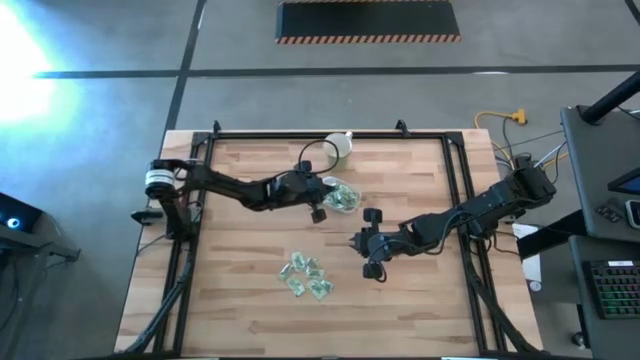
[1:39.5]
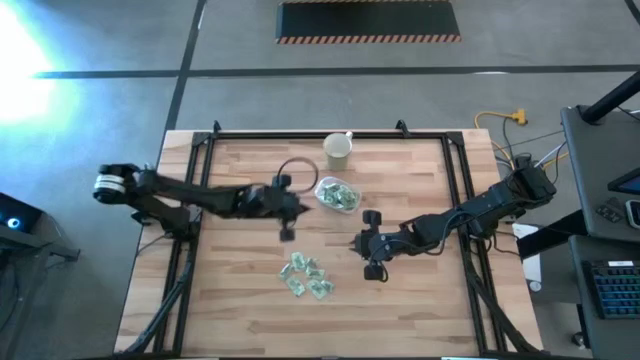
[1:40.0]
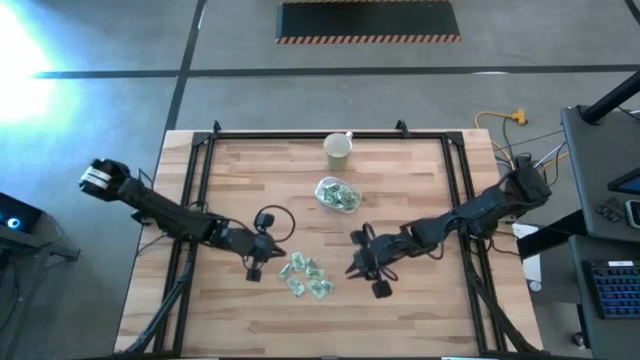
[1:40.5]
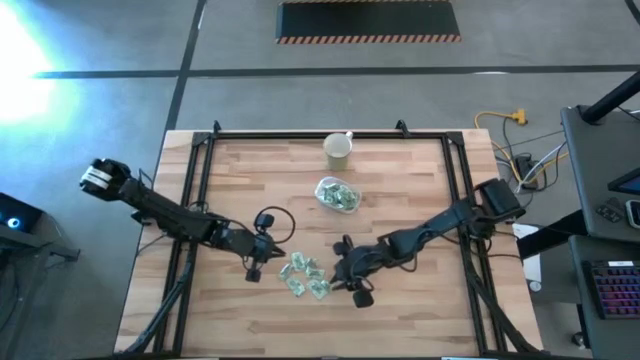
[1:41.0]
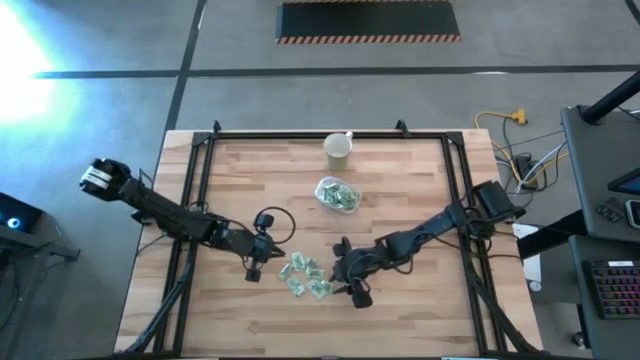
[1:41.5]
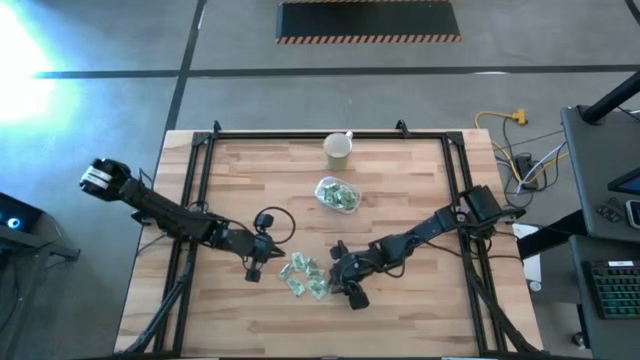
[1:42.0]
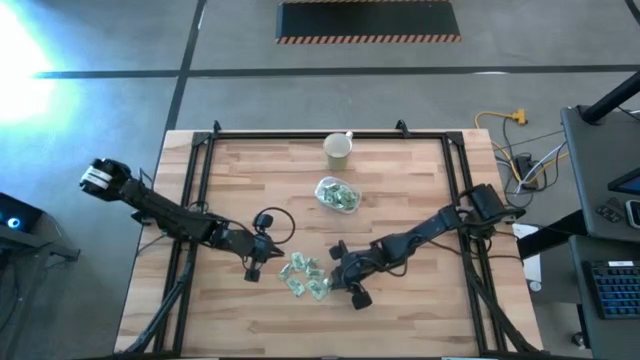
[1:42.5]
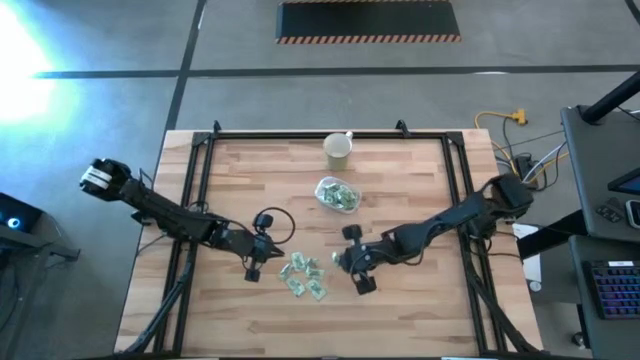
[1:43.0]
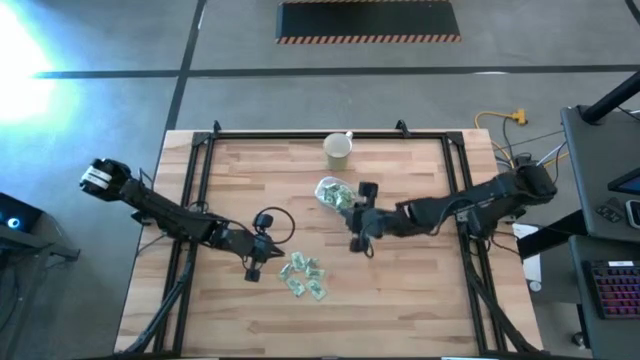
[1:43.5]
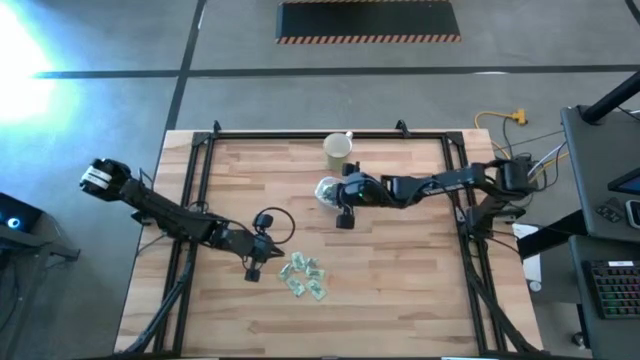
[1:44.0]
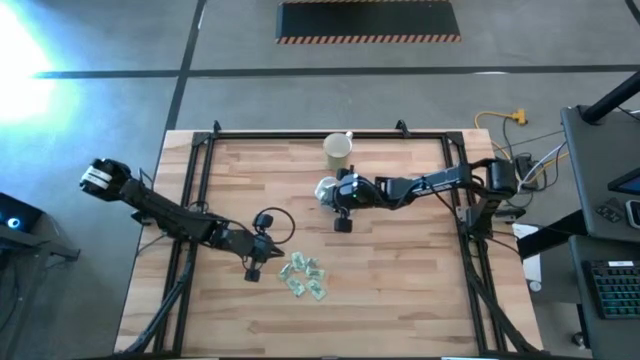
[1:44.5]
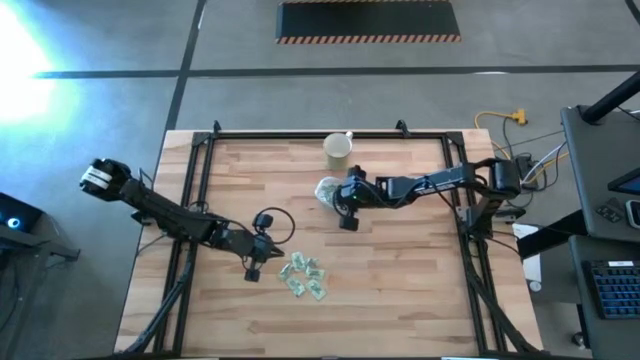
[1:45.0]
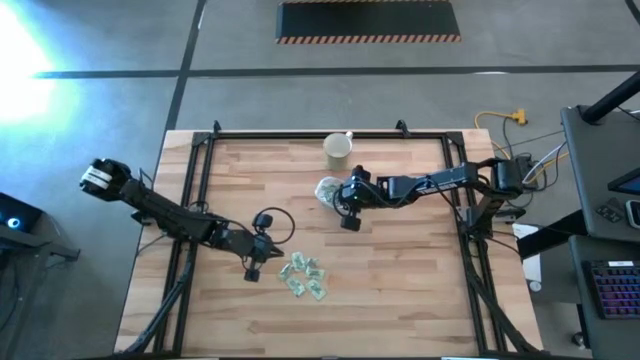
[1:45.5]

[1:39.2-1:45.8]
Task: Pick and place items into bin
Put the green stevia packet into the transparent bin

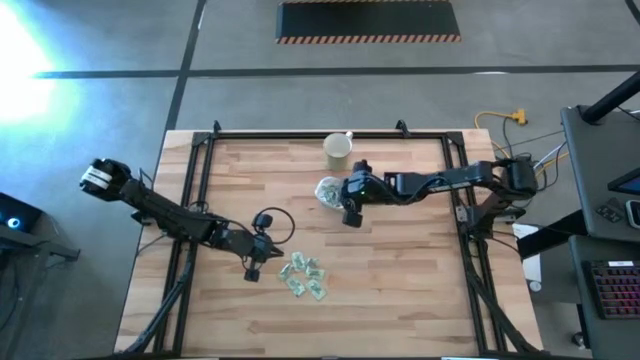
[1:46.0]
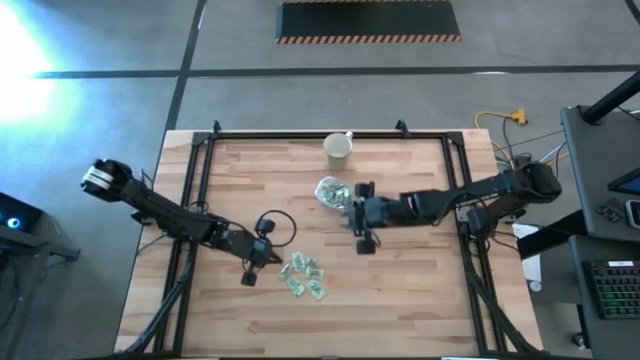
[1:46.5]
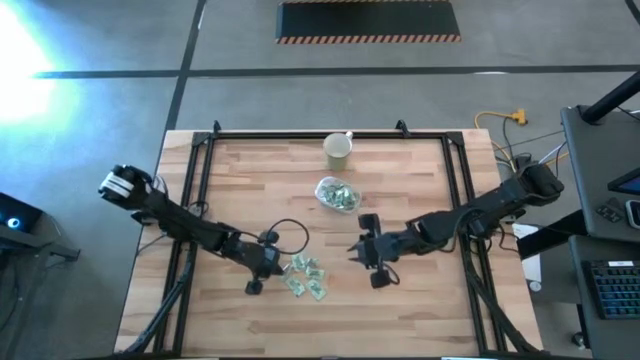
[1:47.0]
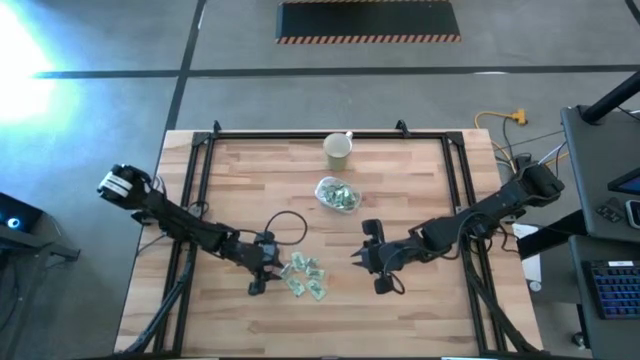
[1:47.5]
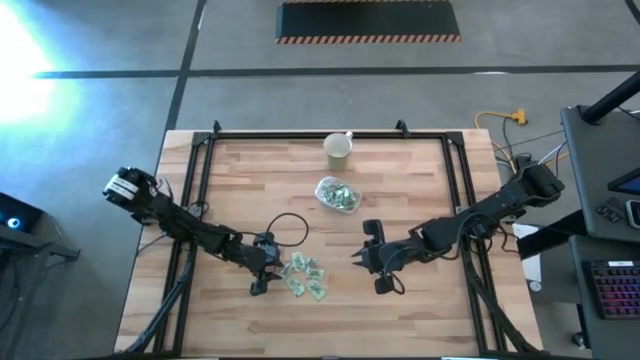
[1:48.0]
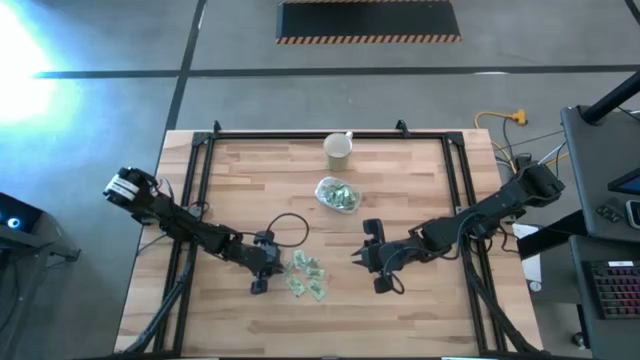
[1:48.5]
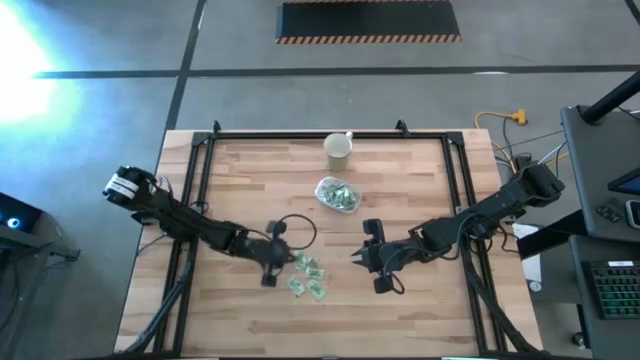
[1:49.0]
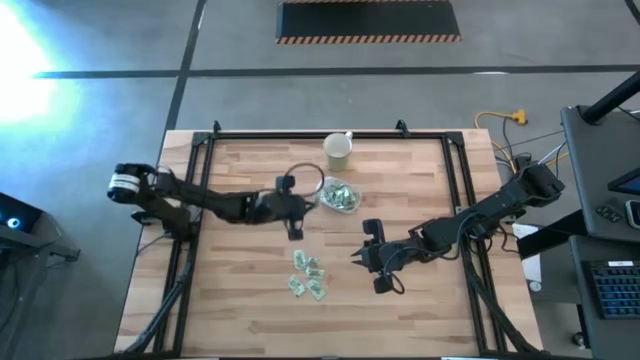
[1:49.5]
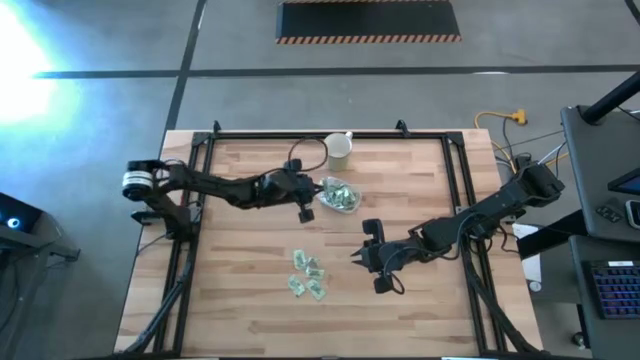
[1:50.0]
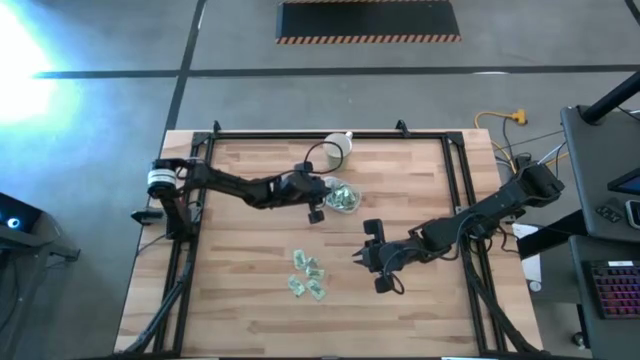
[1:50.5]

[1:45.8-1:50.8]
Put the green stevia packet into the transparent bin

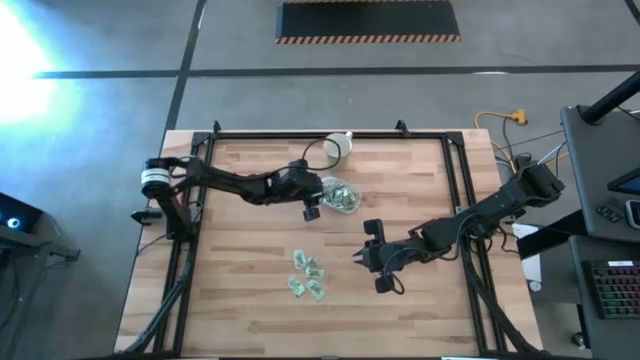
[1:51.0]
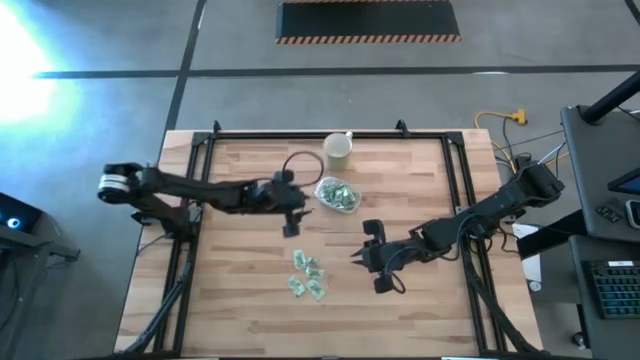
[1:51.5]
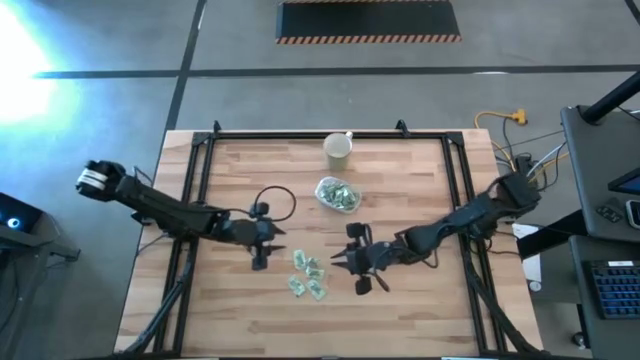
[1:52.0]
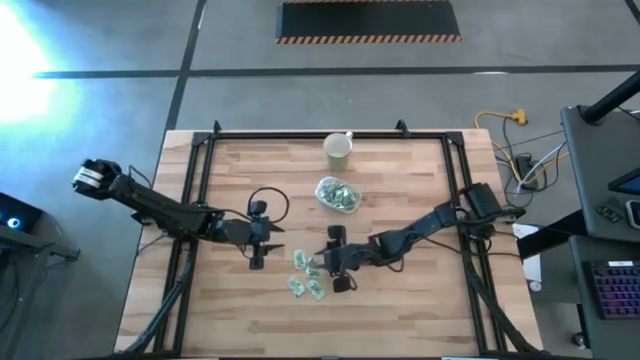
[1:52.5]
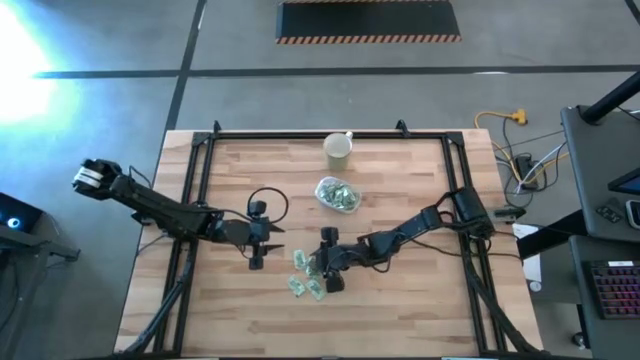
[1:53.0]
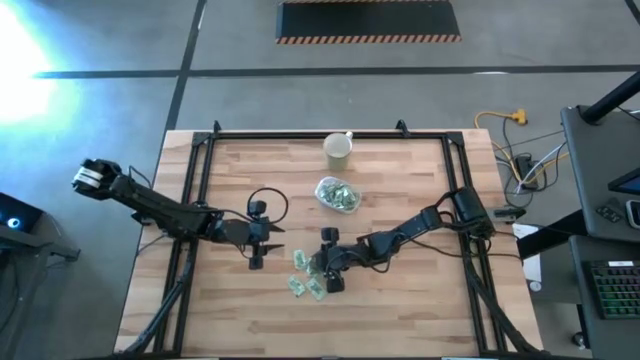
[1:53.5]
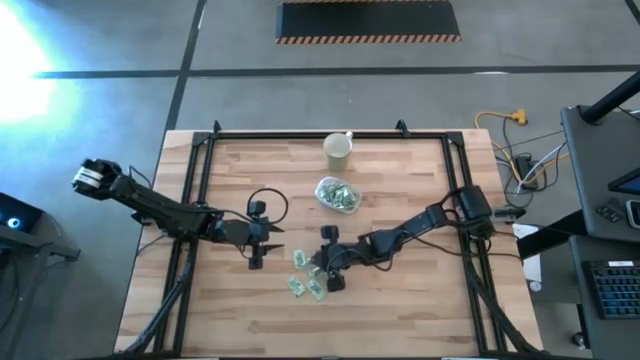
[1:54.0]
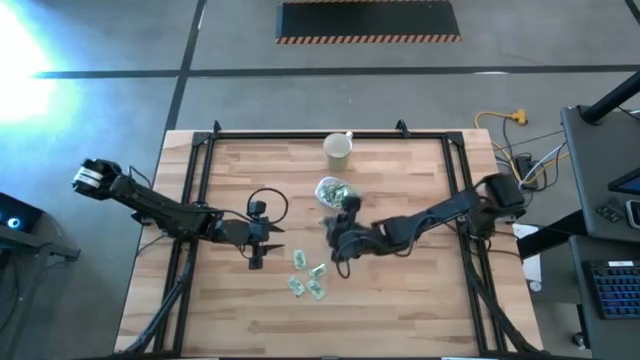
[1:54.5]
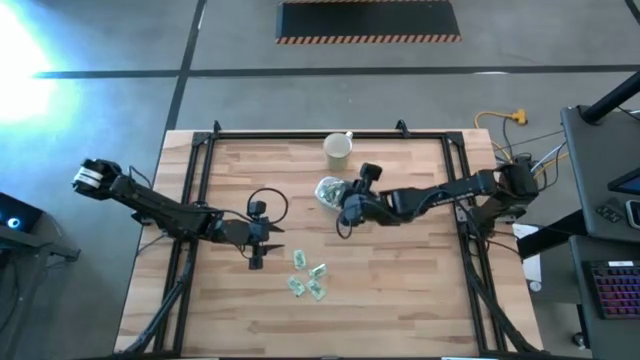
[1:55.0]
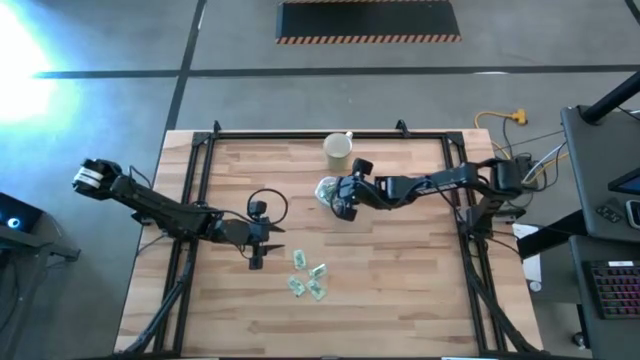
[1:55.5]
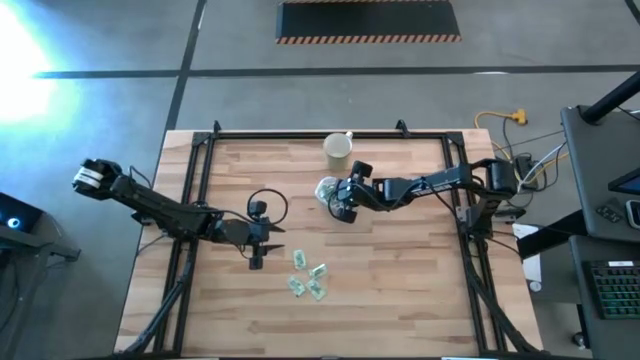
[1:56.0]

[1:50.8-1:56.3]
Put the green stevia packet into the transparent bin

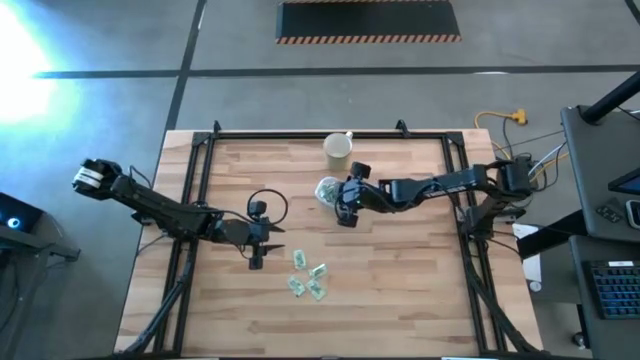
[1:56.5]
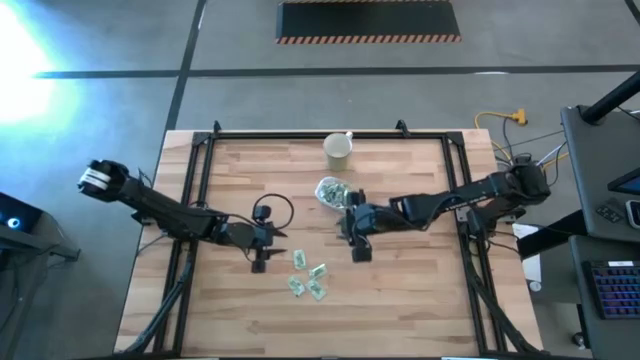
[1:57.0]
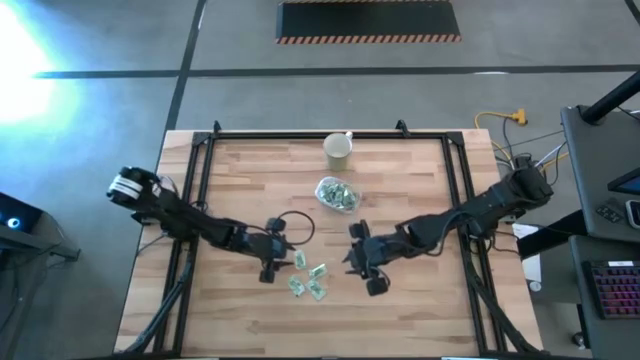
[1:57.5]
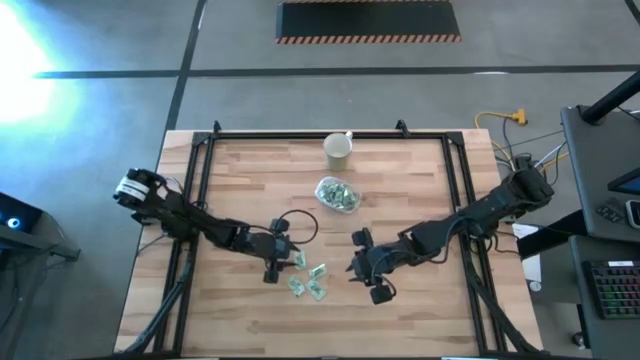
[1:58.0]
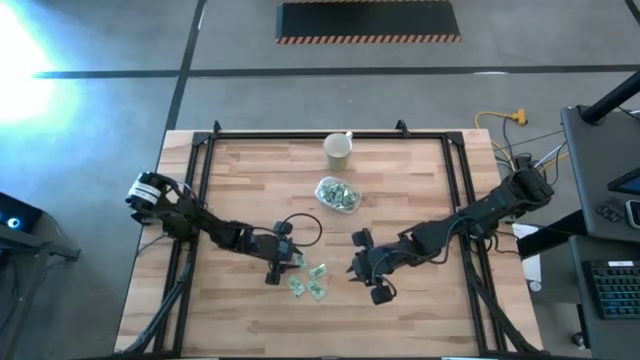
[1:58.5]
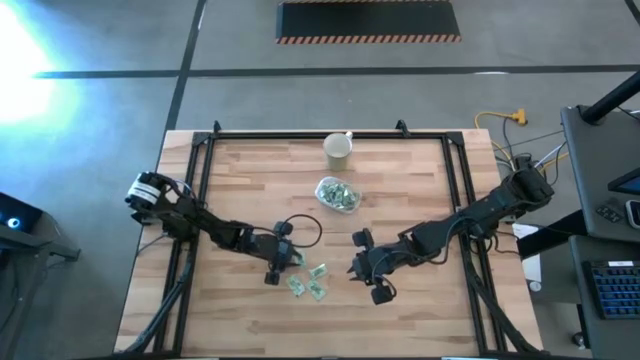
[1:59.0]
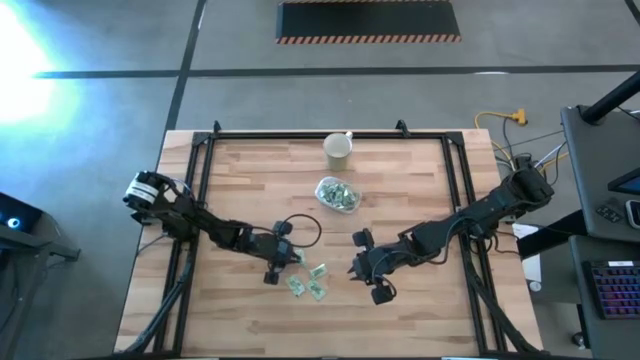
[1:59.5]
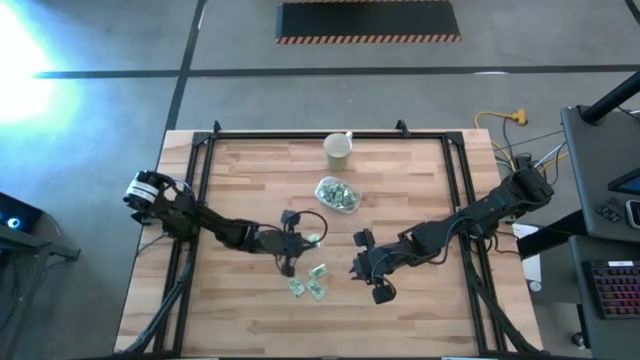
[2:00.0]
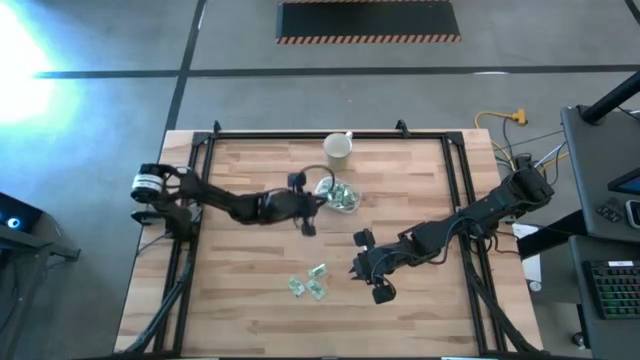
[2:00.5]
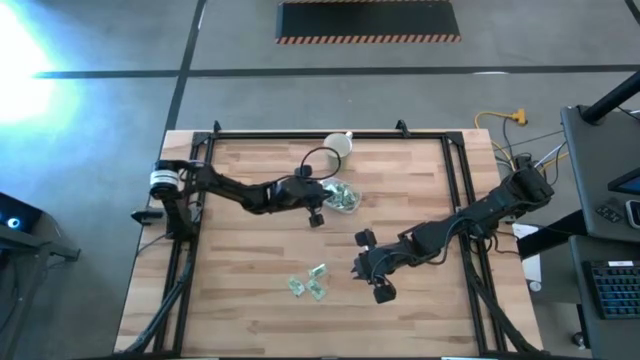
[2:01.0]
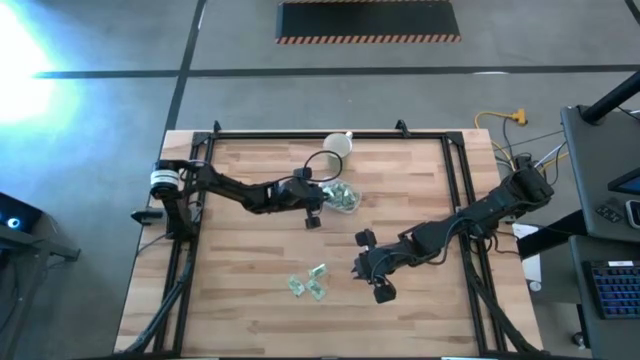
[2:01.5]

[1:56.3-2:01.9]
Put the green stevia packet into the transparent bin
